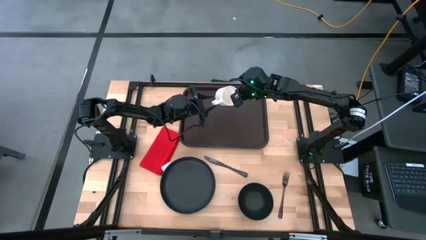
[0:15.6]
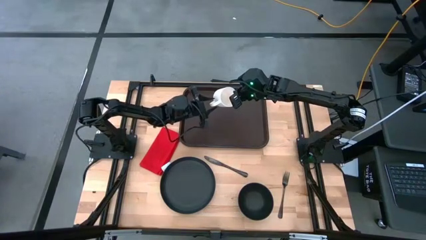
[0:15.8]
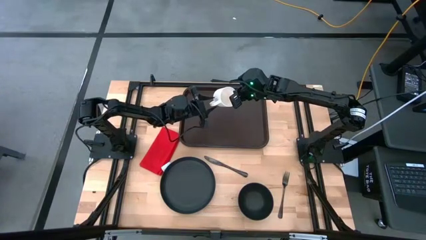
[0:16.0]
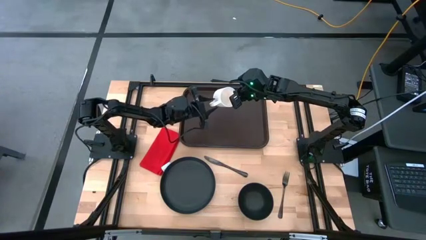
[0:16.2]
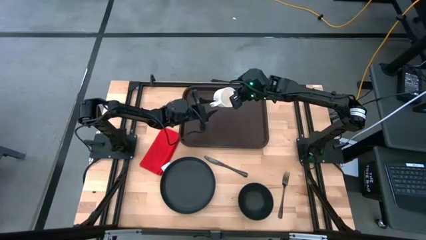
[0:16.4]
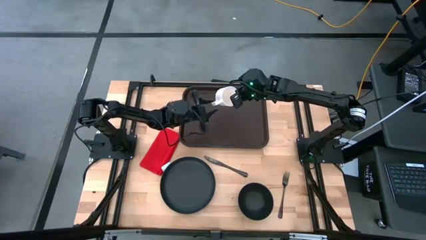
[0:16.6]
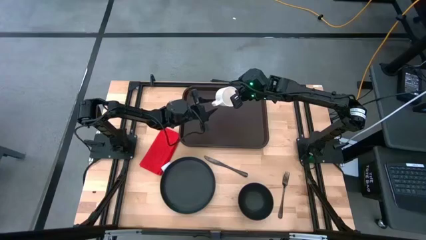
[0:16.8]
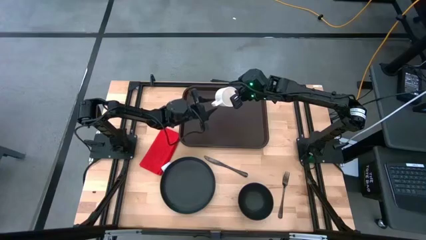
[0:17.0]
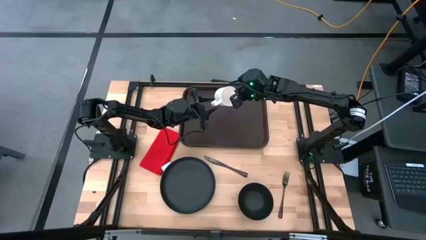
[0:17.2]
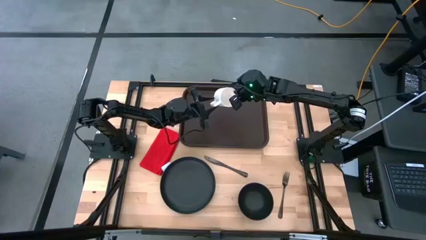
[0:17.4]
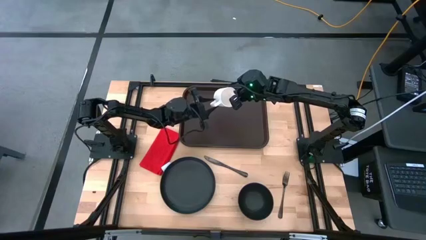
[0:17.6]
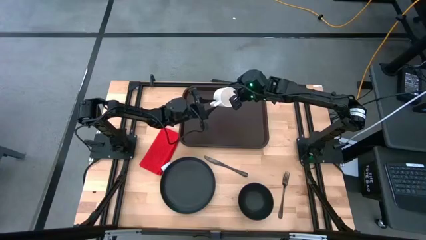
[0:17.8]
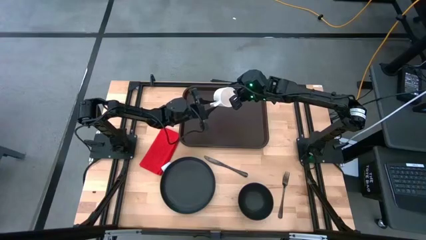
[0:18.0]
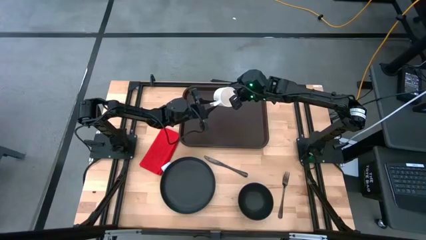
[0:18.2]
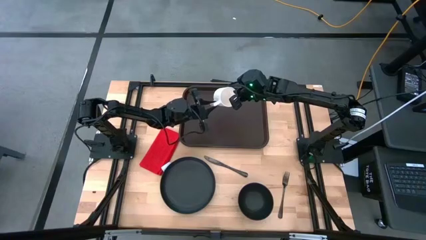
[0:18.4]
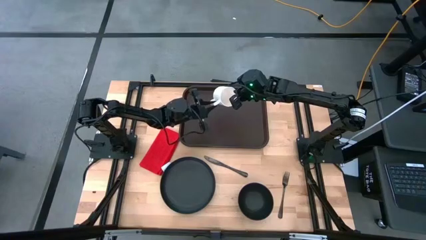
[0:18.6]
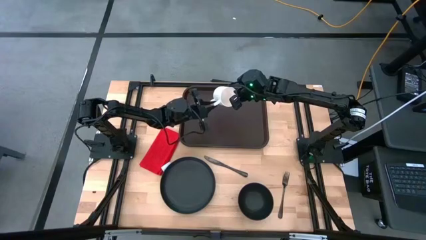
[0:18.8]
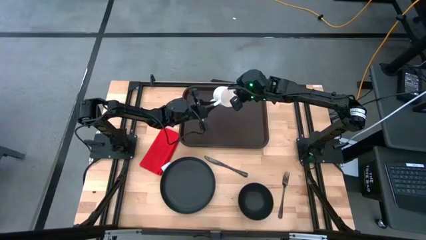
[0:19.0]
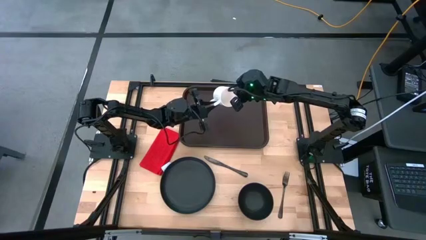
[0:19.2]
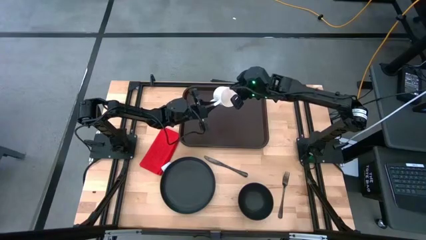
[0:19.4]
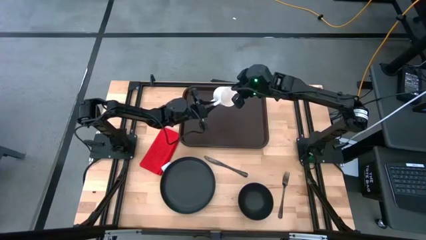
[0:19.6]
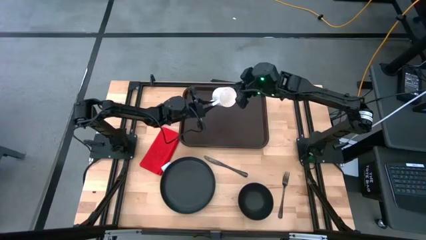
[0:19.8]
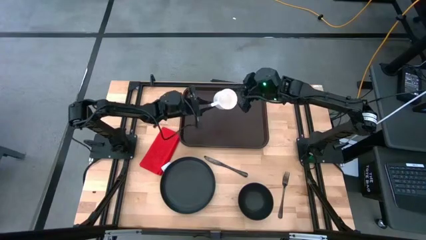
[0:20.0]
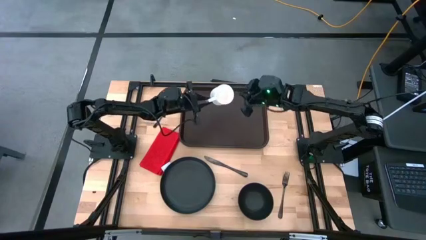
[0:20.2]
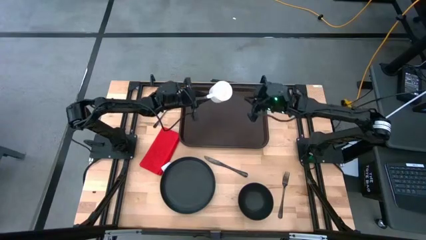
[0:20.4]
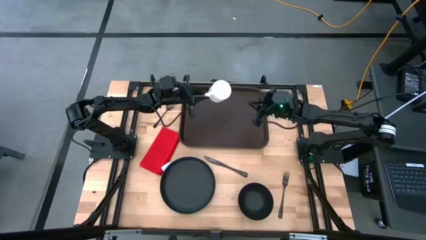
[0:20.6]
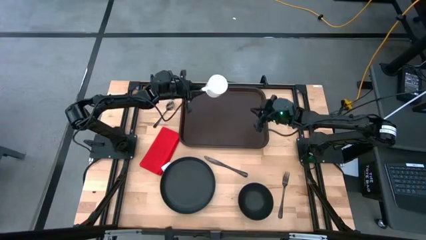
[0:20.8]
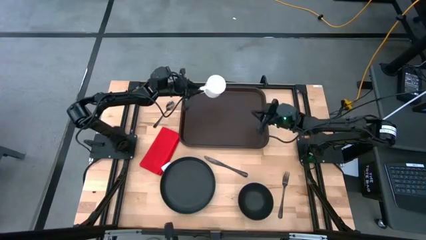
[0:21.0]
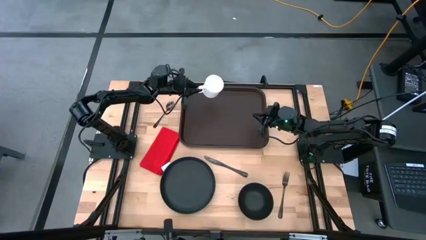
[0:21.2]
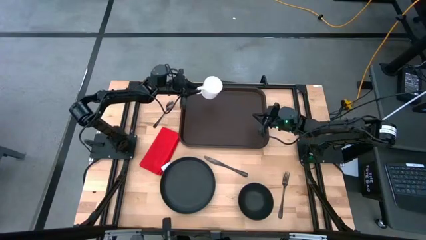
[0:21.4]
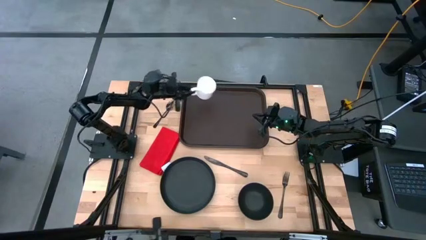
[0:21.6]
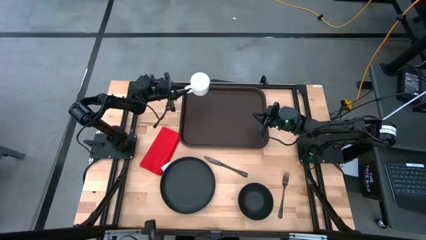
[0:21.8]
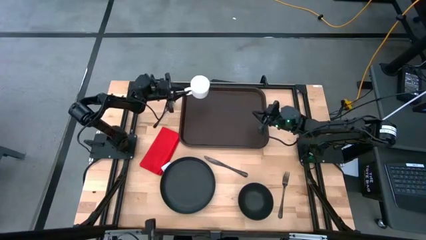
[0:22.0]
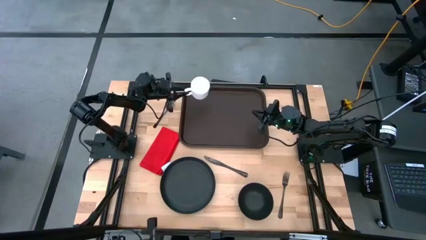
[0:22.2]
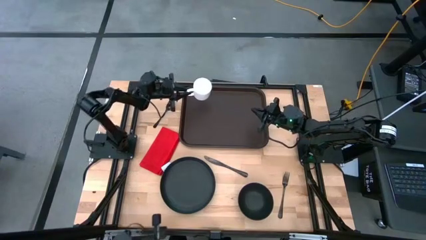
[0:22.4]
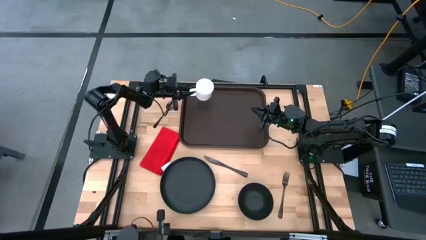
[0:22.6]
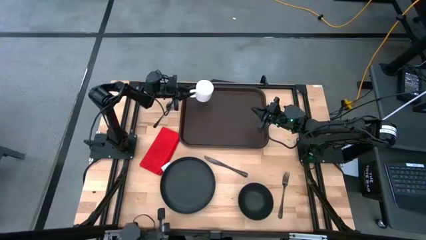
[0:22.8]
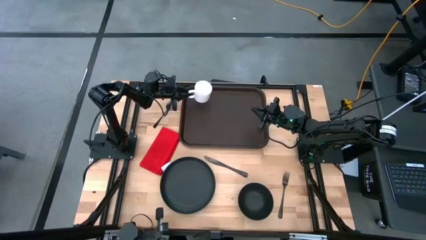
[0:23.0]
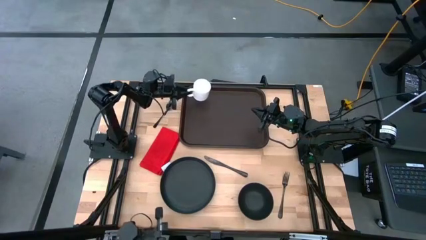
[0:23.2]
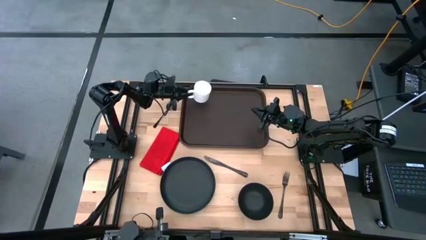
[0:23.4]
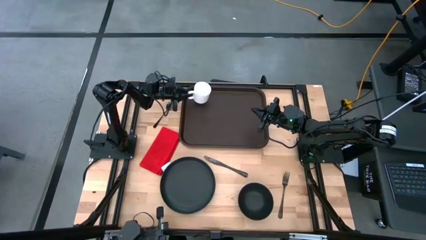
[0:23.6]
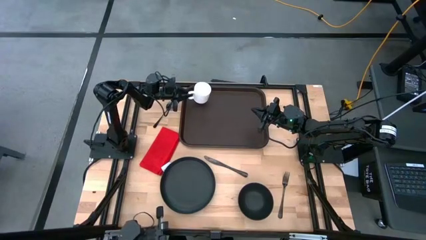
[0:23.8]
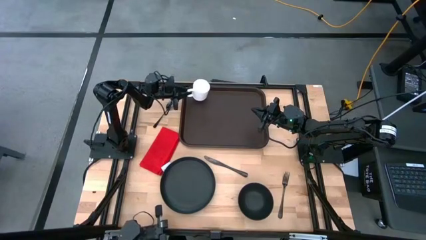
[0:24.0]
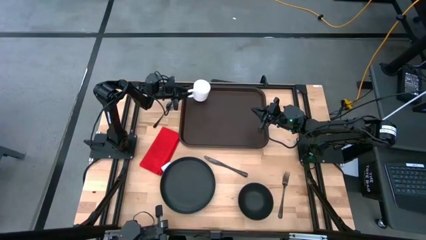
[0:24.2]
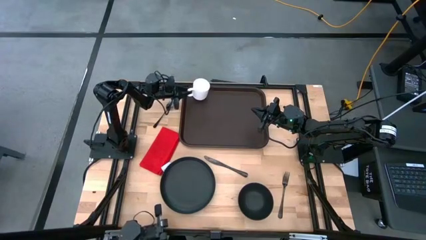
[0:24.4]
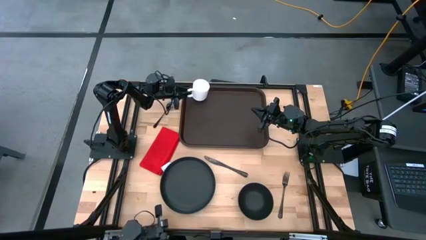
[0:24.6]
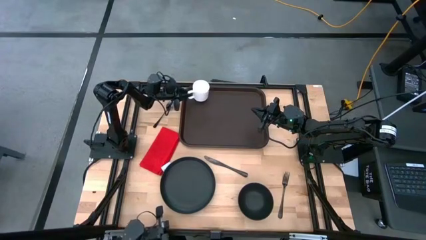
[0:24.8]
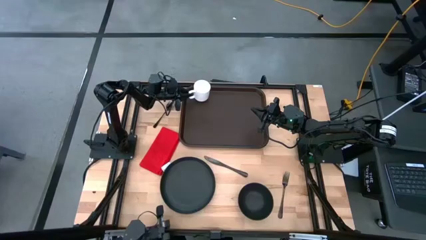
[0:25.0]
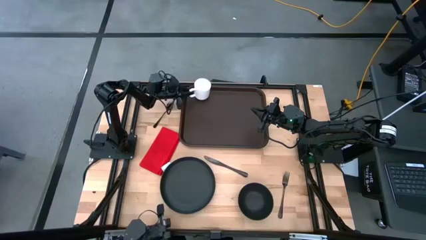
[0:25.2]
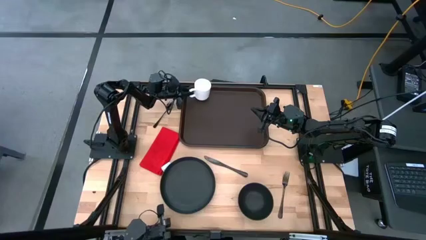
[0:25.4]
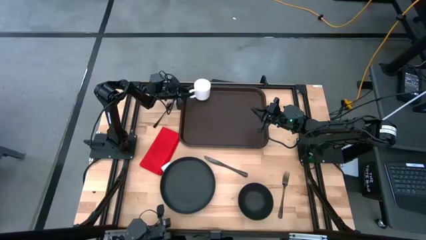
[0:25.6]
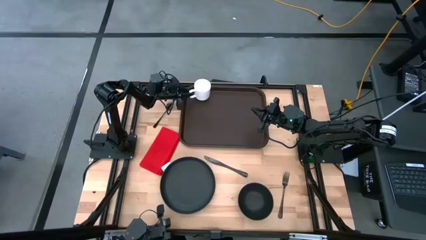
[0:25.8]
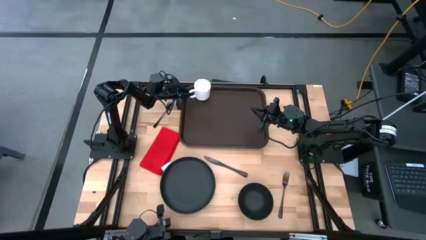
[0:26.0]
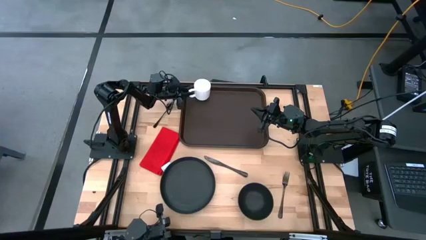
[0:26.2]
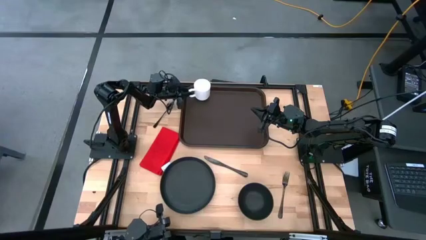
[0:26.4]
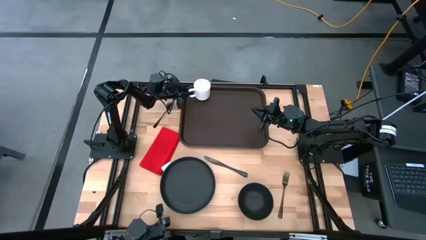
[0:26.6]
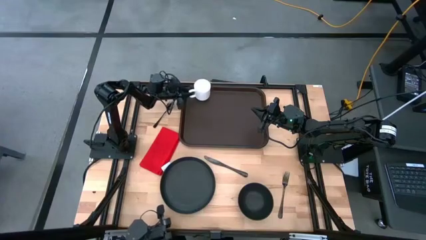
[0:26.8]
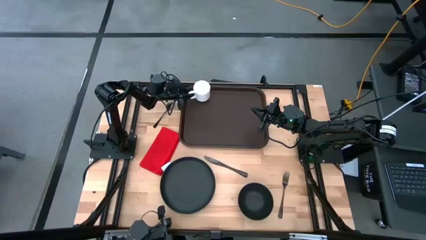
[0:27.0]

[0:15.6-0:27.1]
Task: Set up tray
Put the white mug on the brown serving tray
